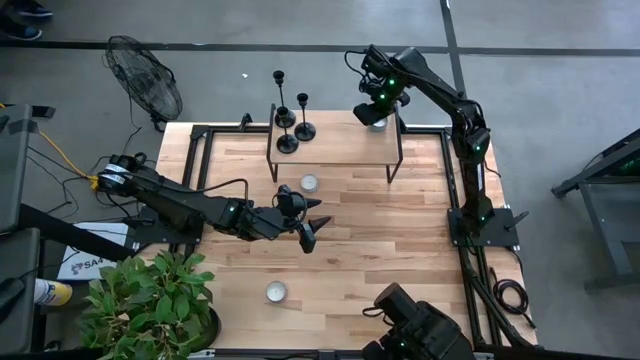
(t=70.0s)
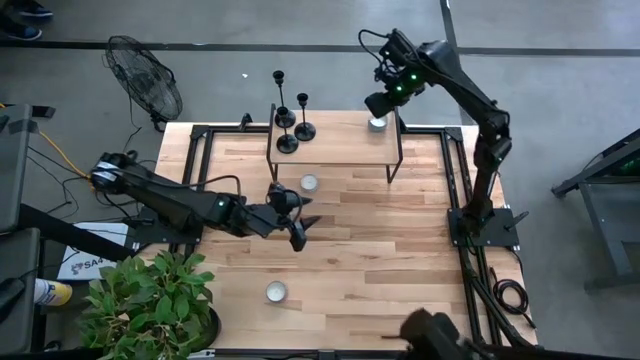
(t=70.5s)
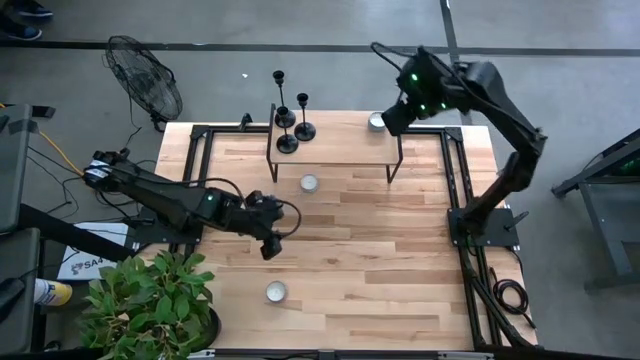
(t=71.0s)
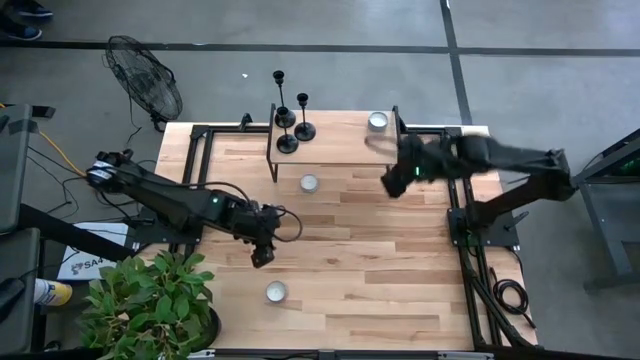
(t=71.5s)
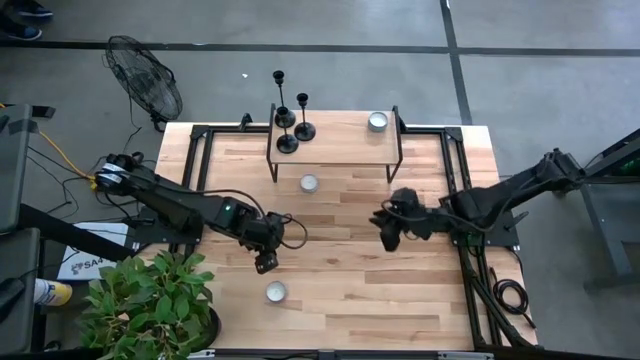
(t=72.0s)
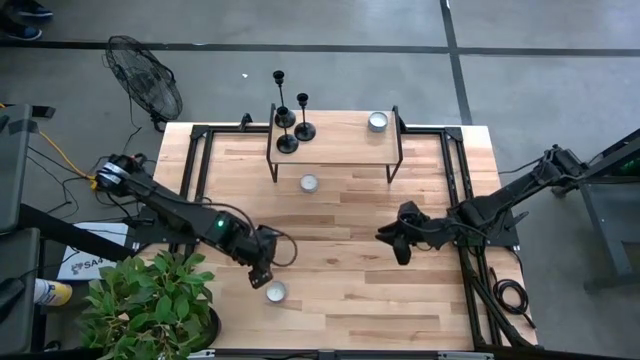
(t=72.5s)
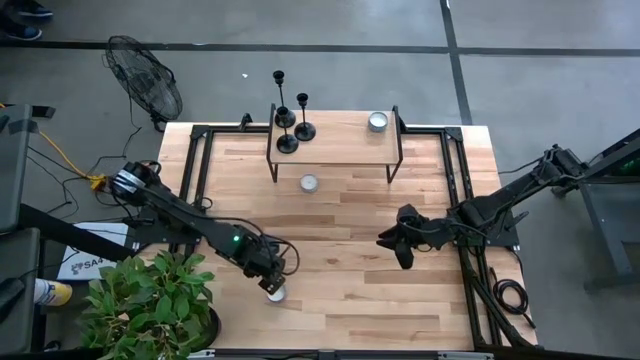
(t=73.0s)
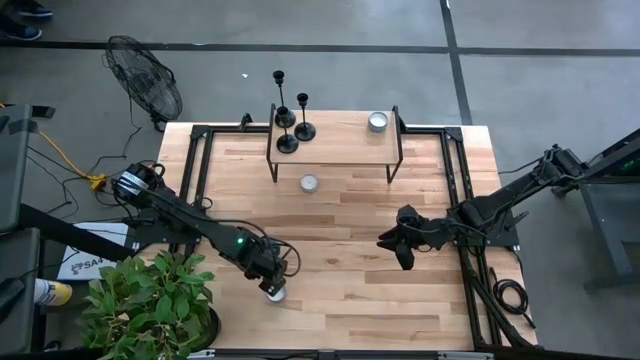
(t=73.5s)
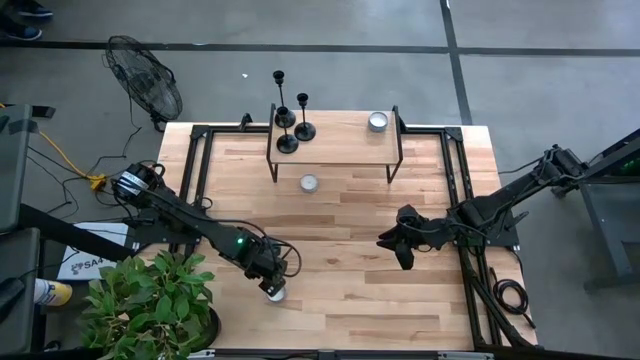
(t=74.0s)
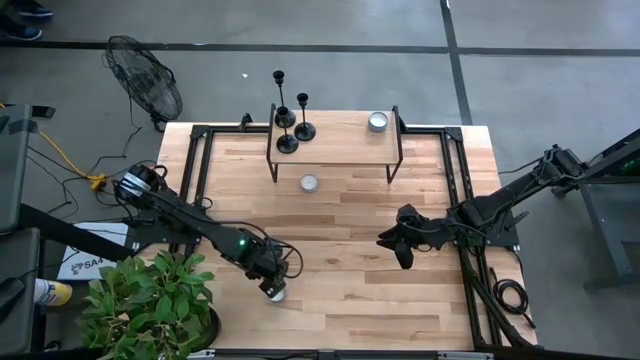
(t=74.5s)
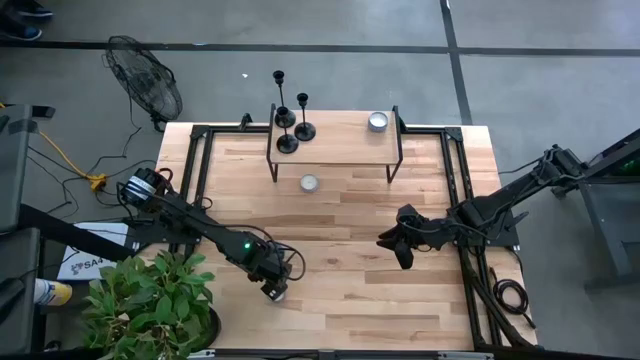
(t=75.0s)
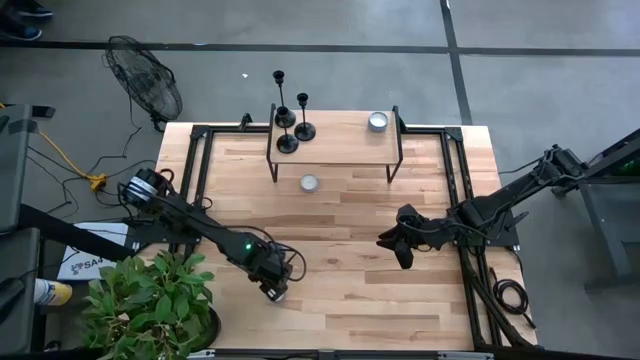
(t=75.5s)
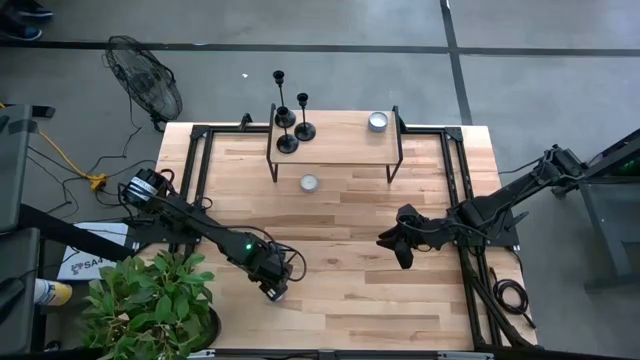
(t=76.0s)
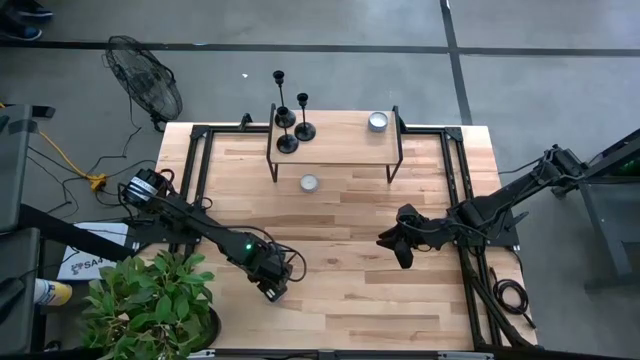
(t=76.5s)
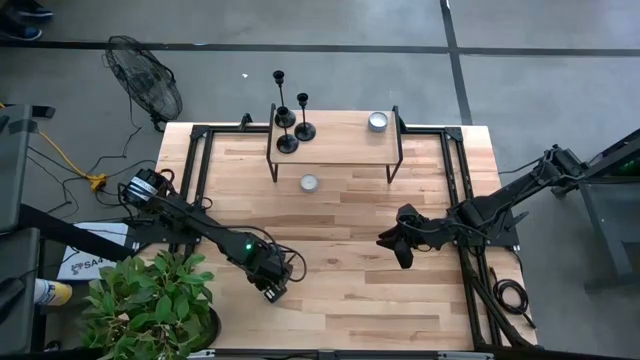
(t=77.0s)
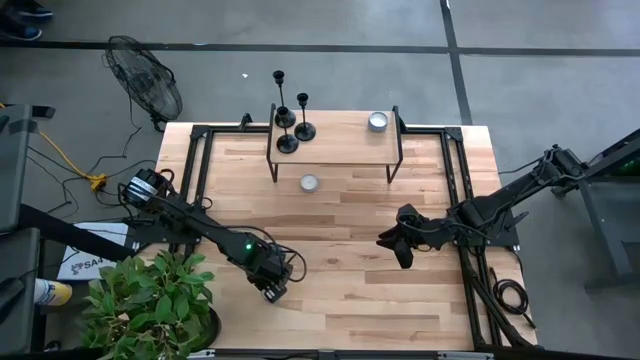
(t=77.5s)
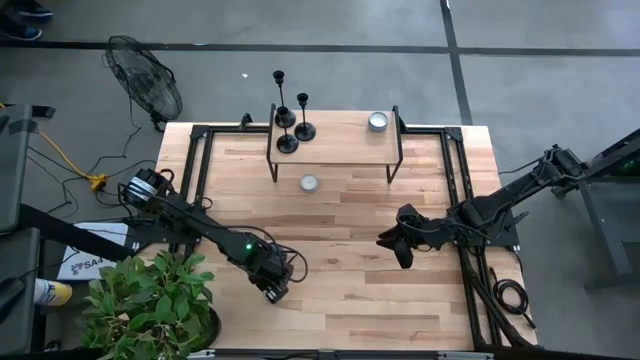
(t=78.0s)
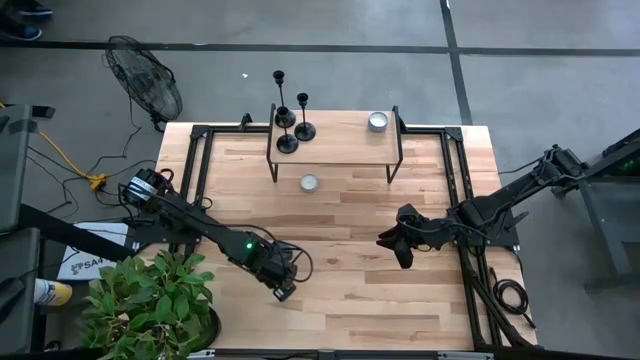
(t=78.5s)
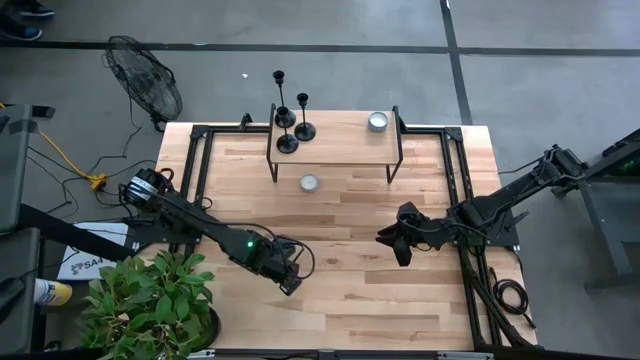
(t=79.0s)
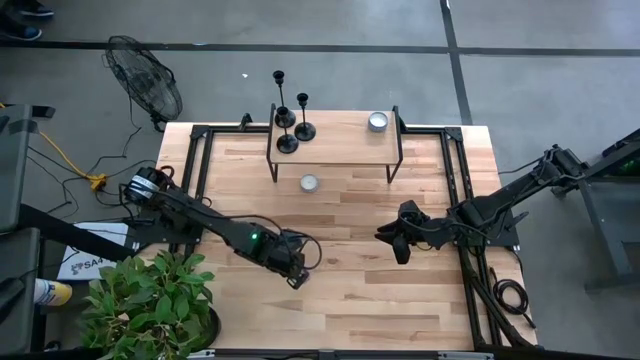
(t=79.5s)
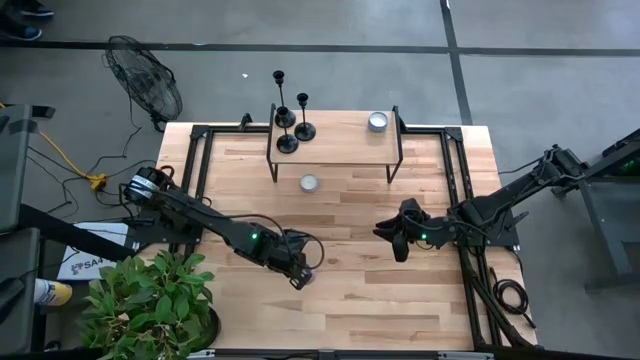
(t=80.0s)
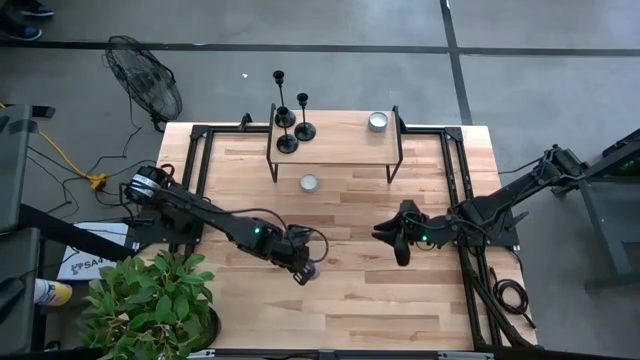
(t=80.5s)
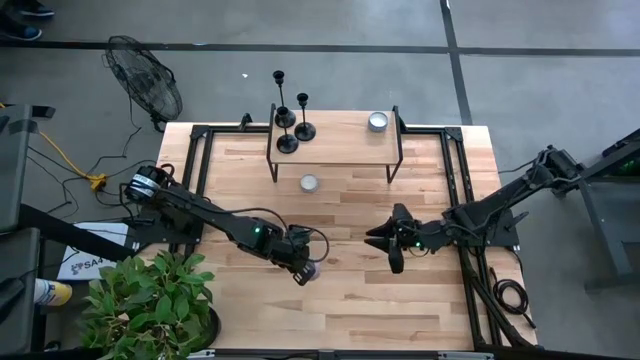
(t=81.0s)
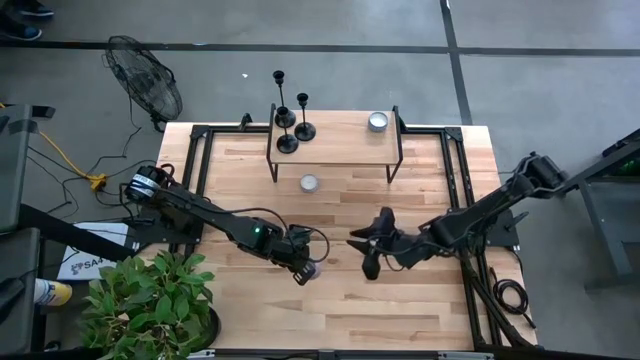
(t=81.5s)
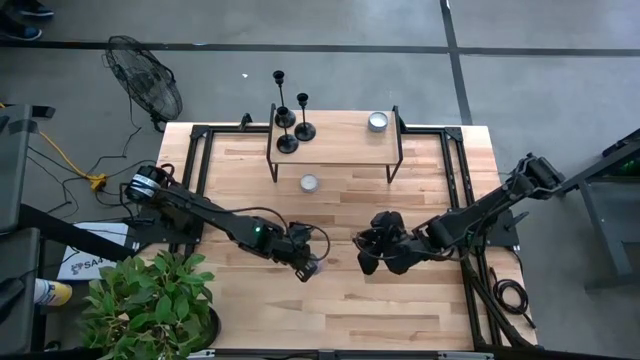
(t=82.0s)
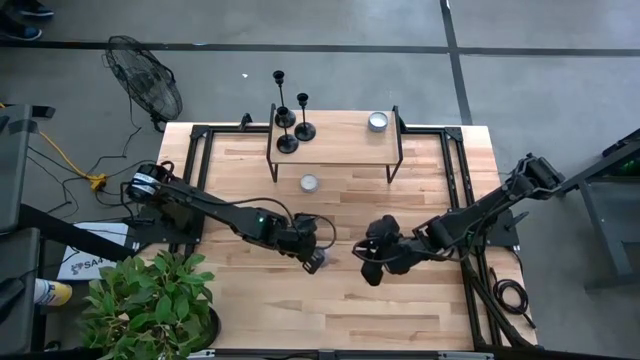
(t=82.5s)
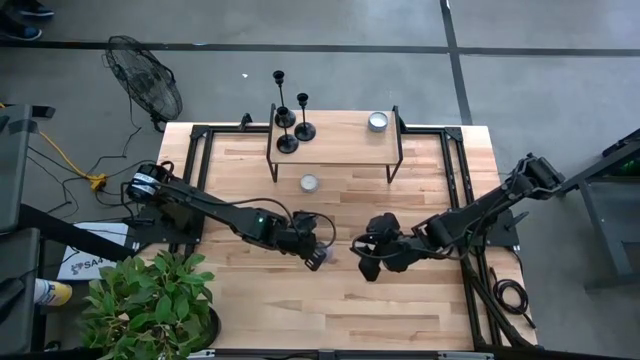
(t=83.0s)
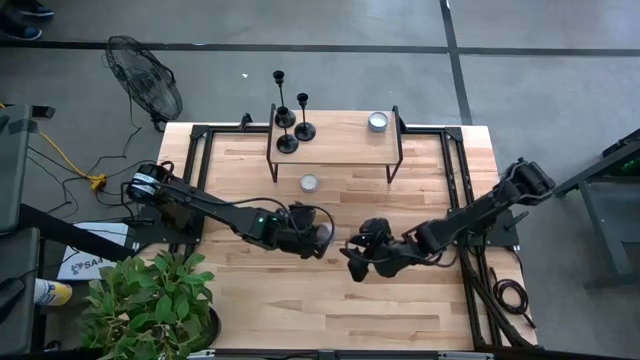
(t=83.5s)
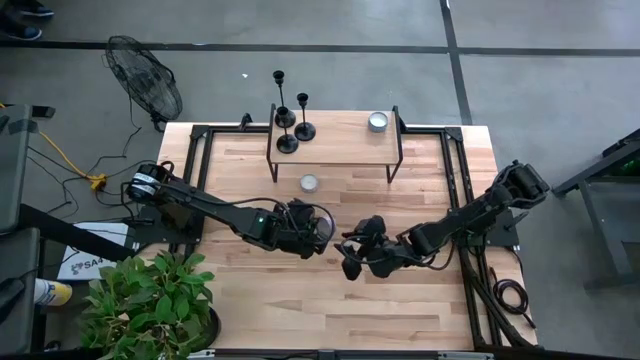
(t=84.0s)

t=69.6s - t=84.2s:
Task: Pick & Place candle stick holders
Put the pink scented candle on the shelf

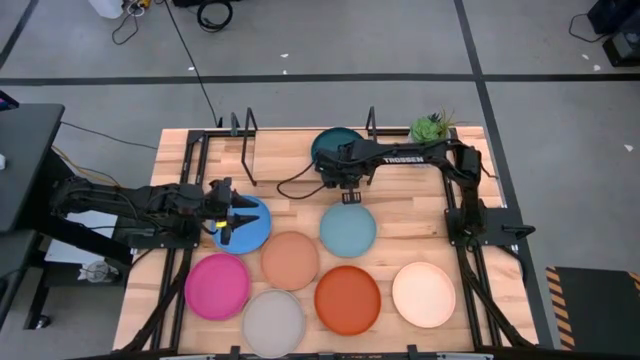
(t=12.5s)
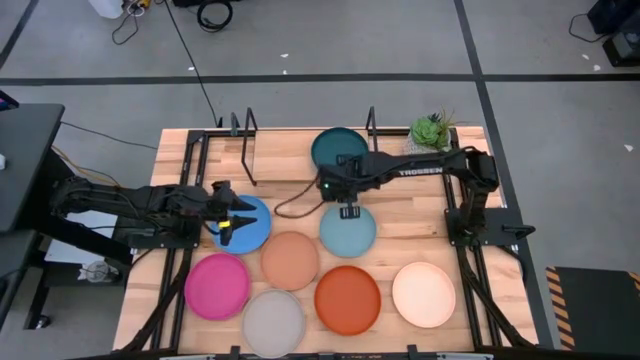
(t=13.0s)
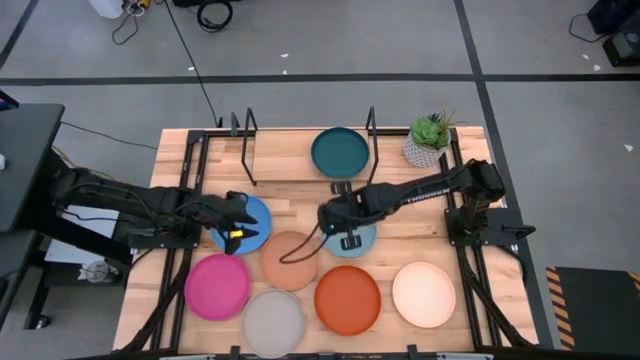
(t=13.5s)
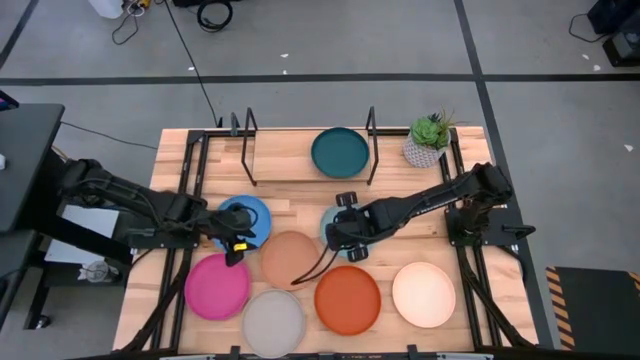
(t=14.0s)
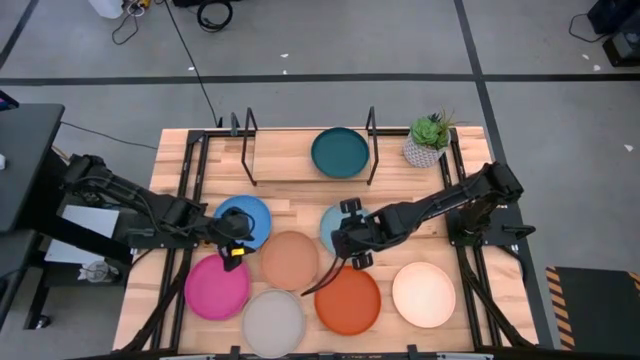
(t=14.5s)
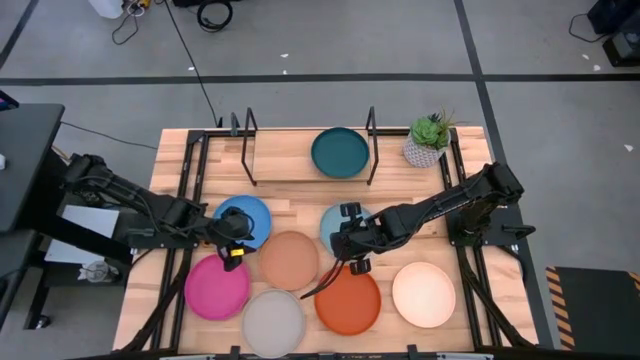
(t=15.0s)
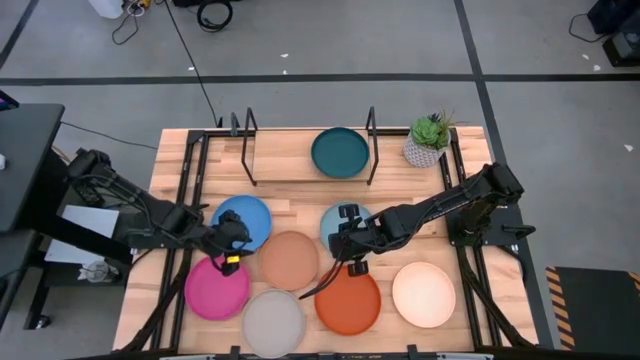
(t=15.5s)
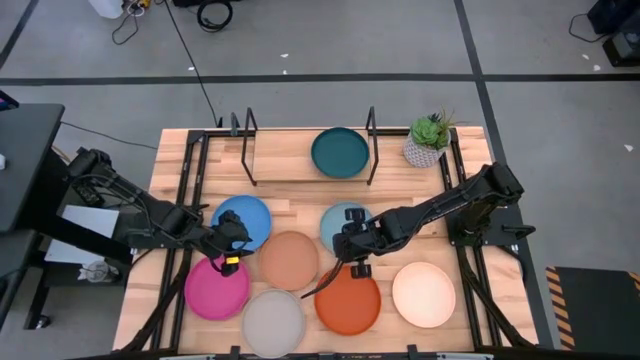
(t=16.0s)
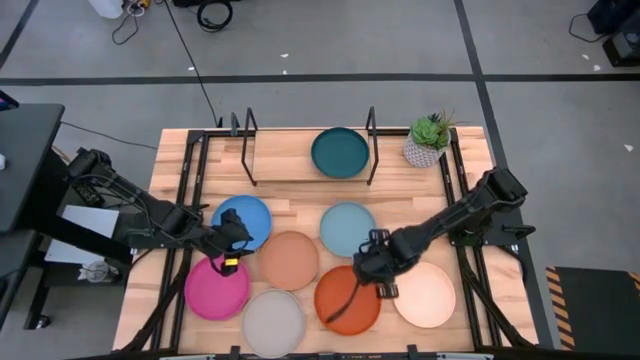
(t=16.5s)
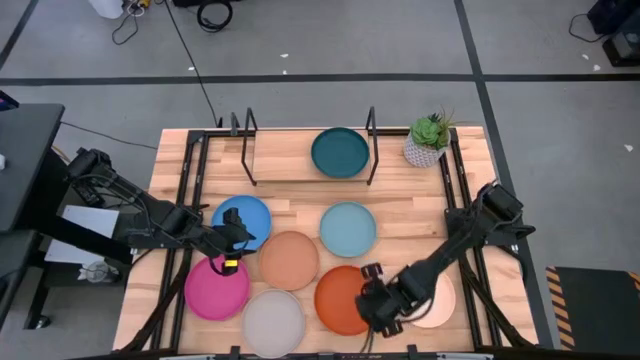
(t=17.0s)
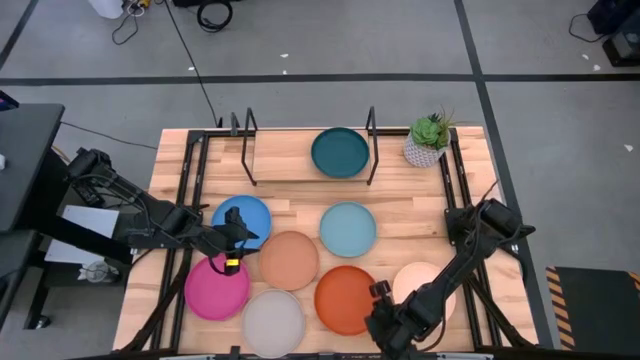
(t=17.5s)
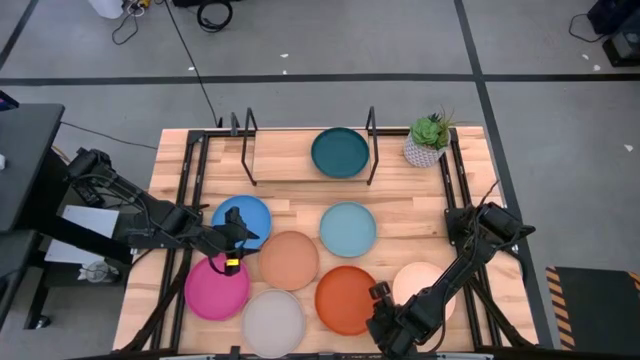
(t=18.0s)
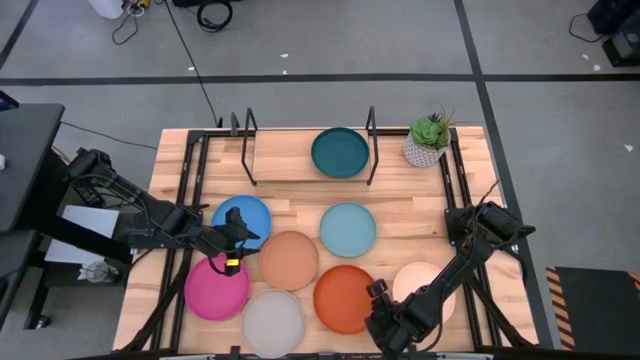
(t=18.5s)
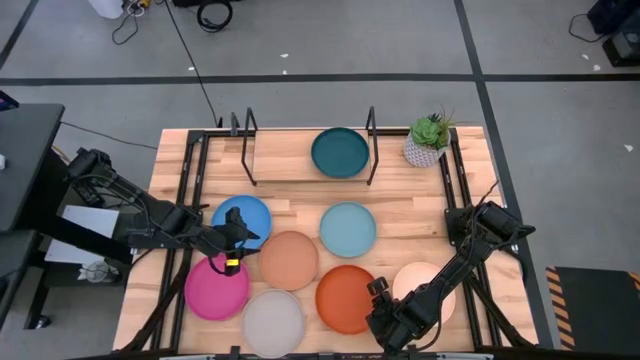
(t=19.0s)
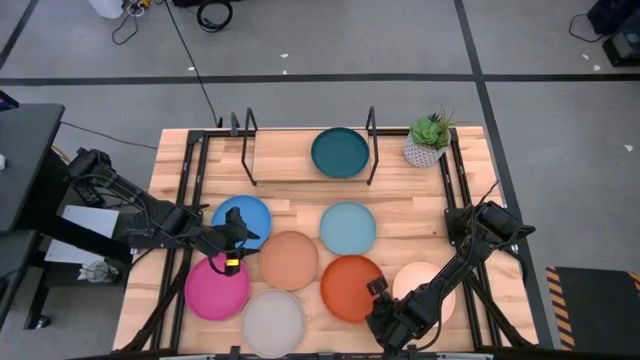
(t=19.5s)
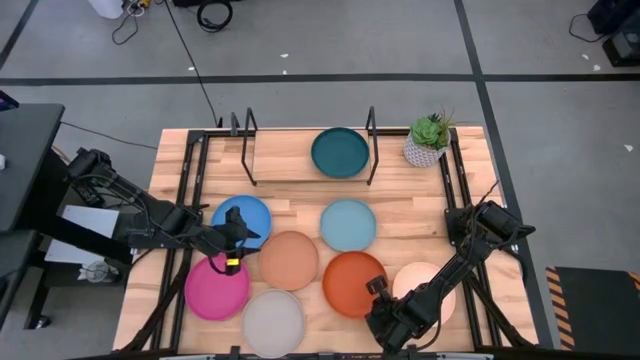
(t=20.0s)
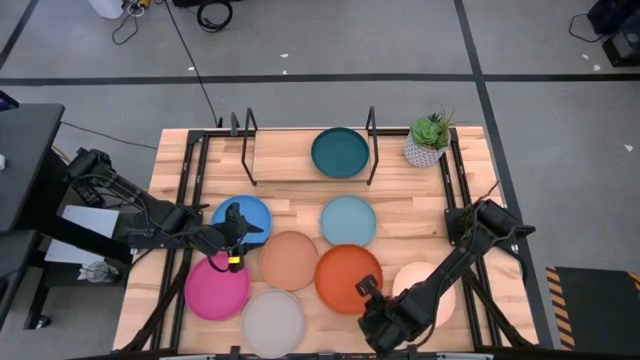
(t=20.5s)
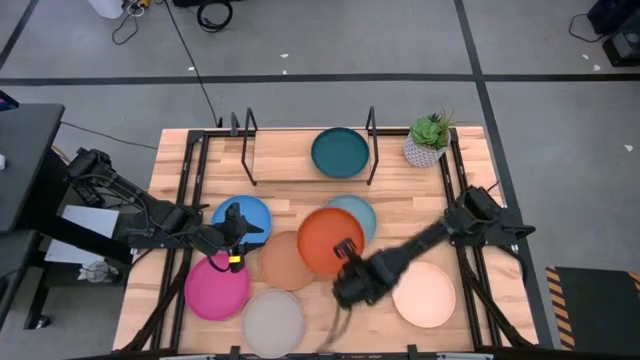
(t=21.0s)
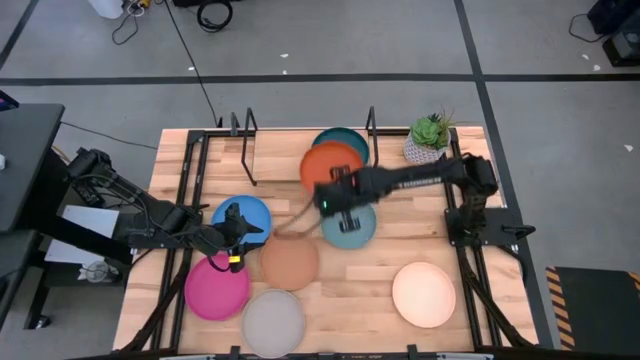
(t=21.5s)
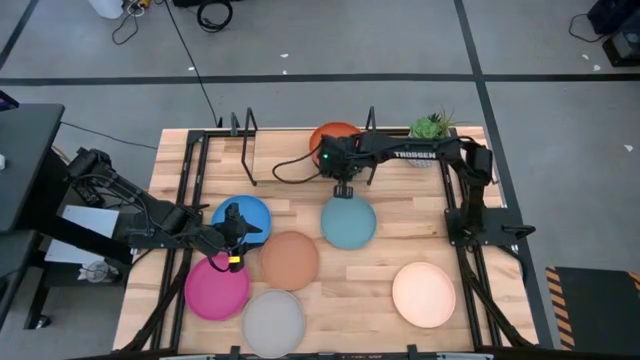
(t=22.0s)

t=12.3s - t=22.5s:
Task: Place and stack plates onto a shelf
Stack the orange plate on top of the dark blue plate on the shelf
